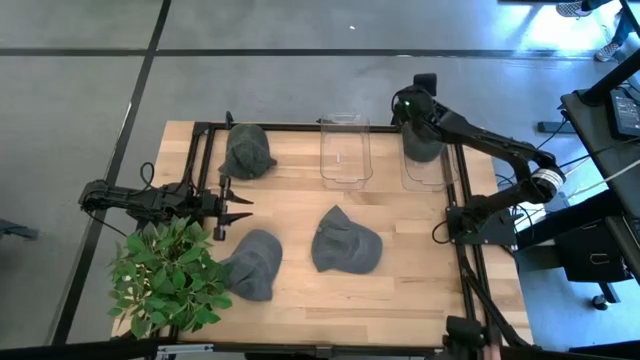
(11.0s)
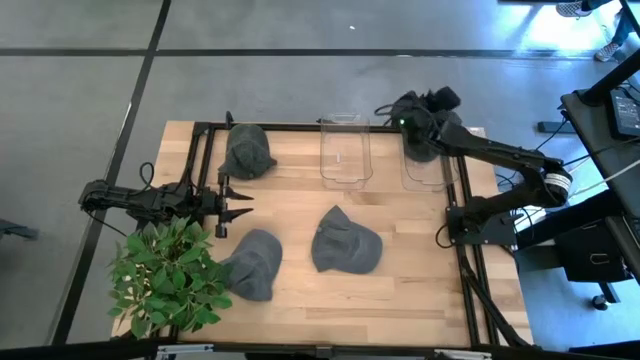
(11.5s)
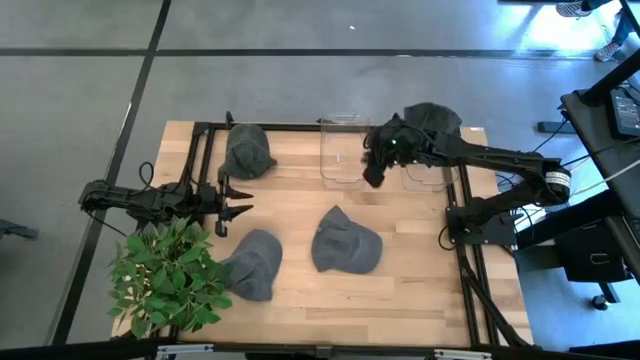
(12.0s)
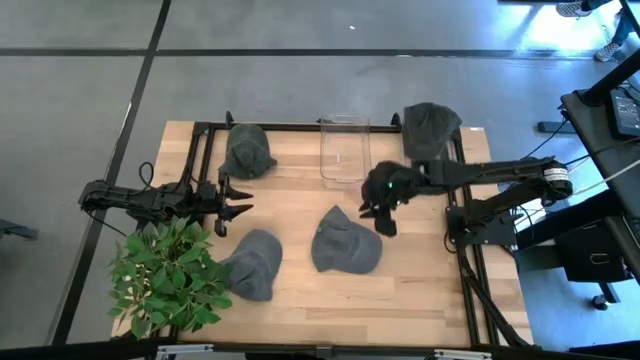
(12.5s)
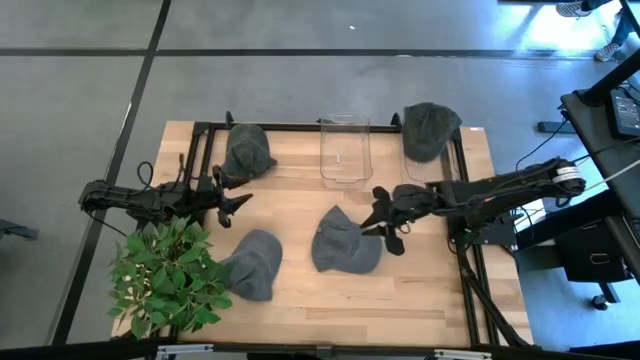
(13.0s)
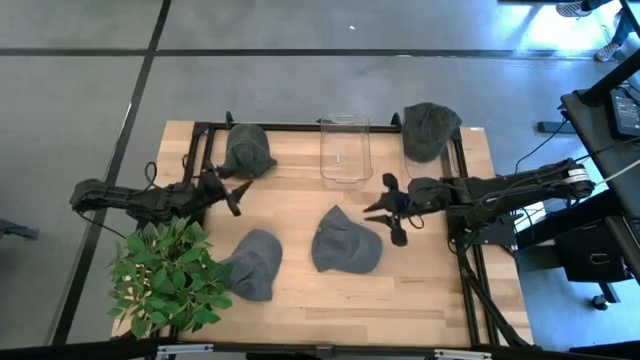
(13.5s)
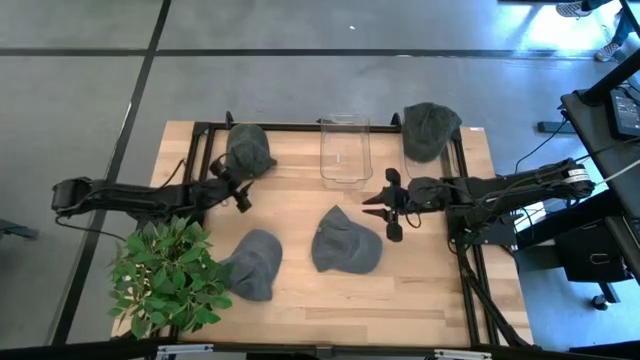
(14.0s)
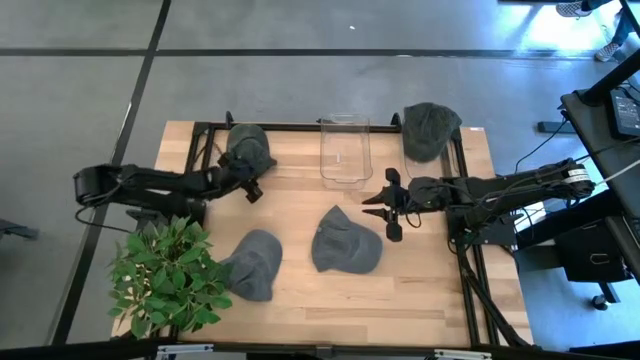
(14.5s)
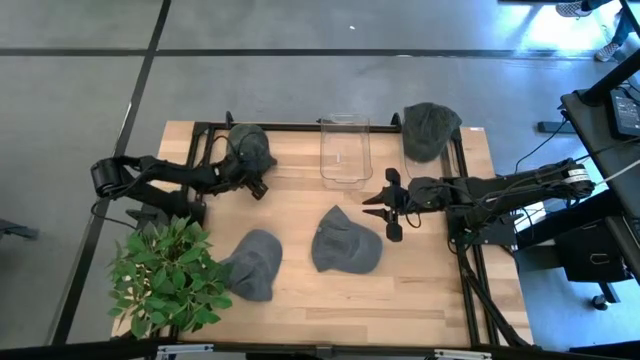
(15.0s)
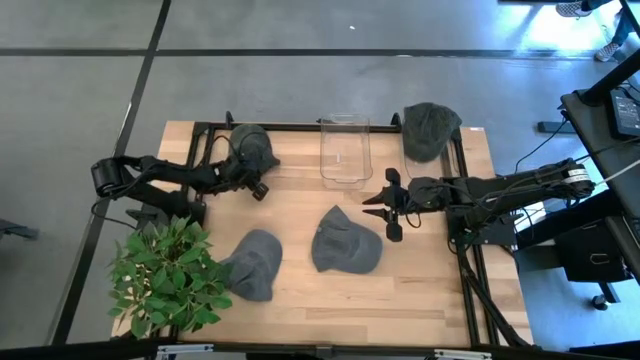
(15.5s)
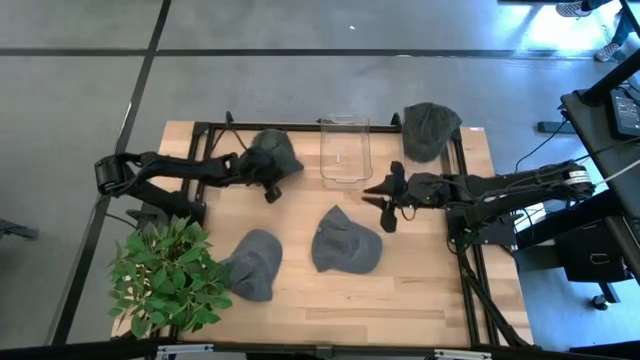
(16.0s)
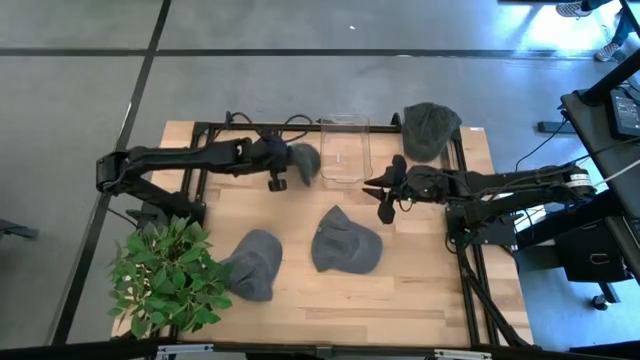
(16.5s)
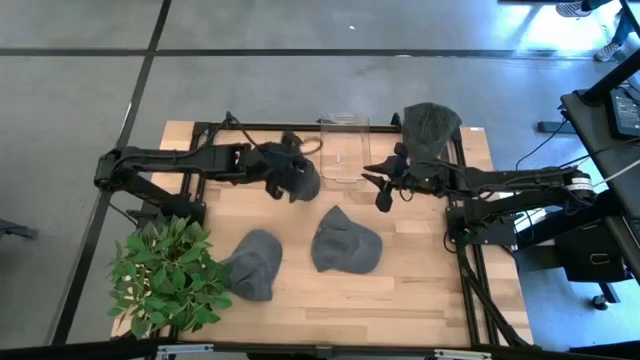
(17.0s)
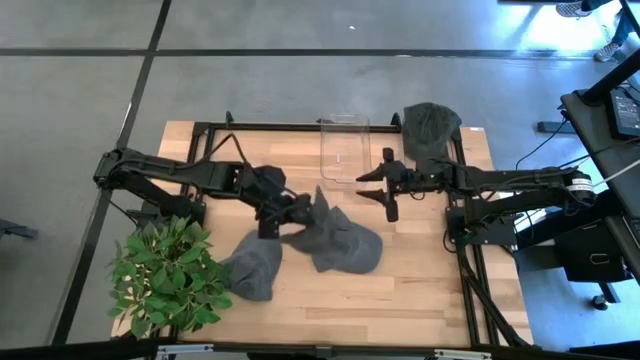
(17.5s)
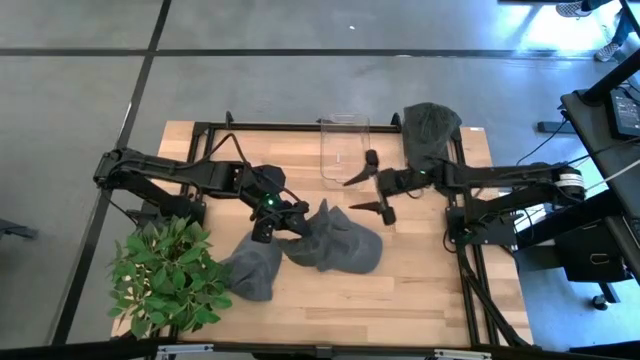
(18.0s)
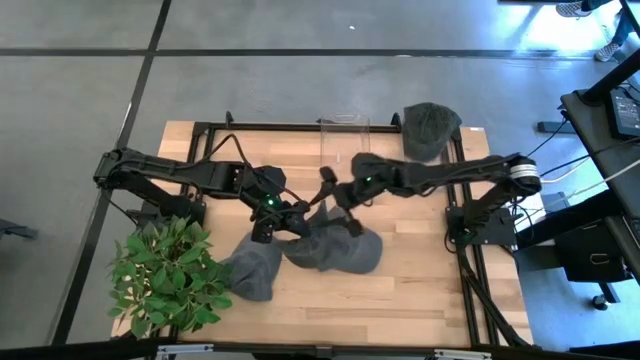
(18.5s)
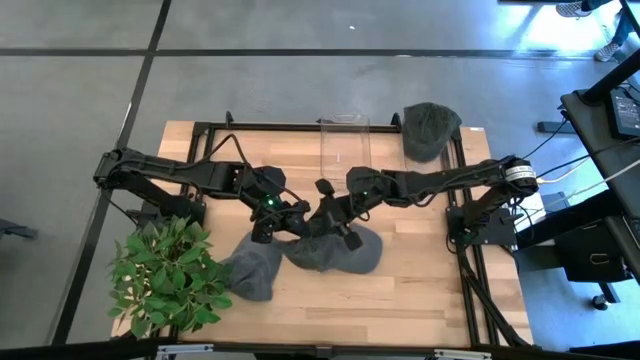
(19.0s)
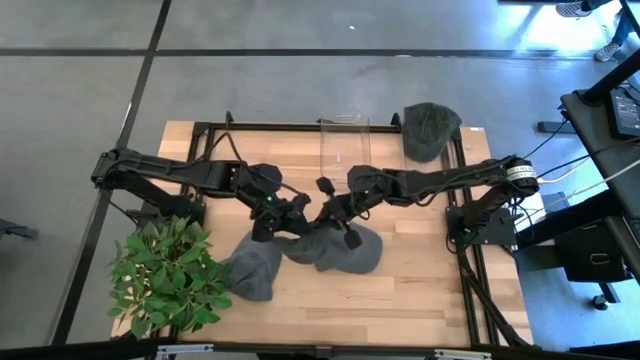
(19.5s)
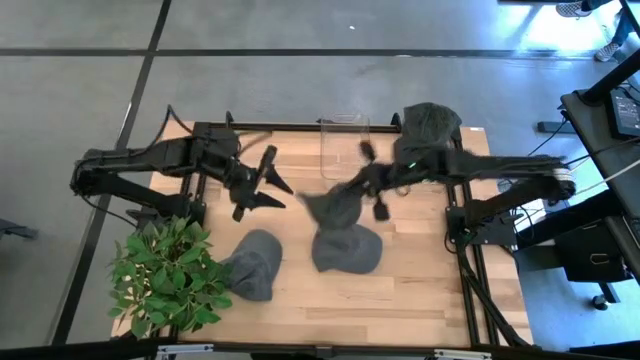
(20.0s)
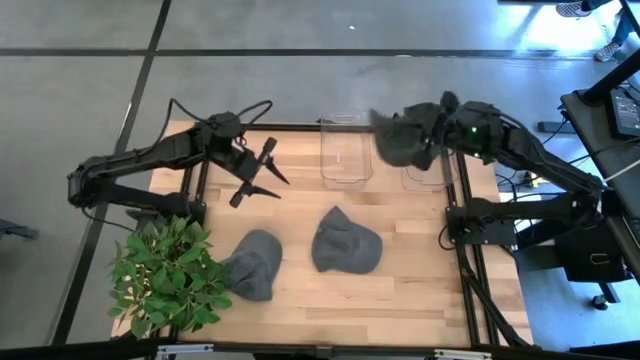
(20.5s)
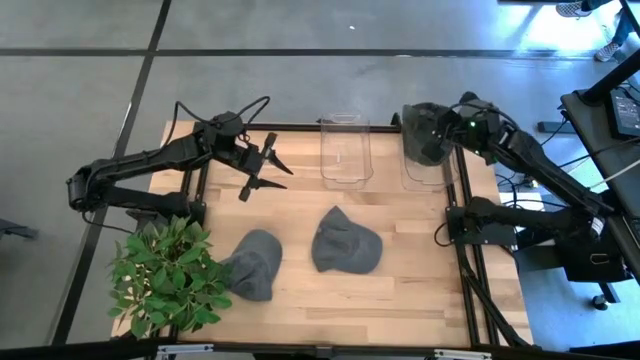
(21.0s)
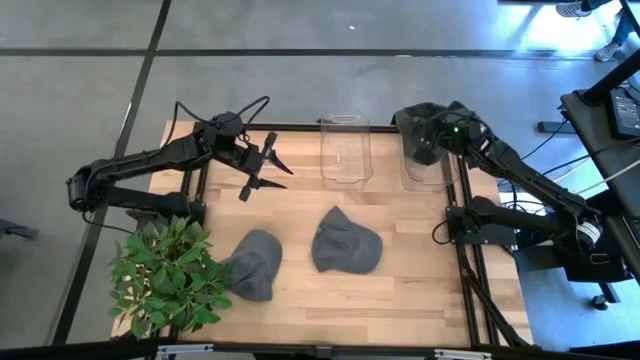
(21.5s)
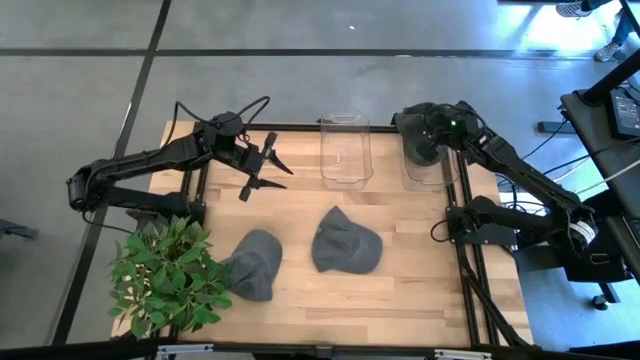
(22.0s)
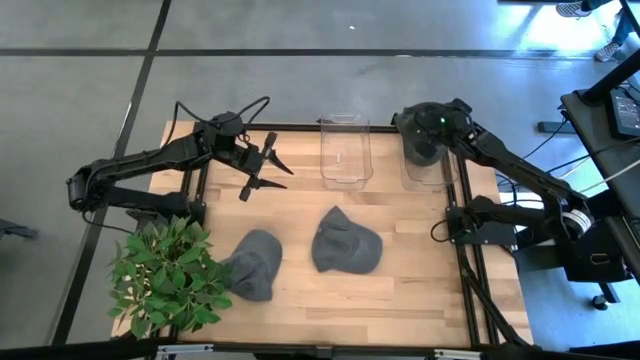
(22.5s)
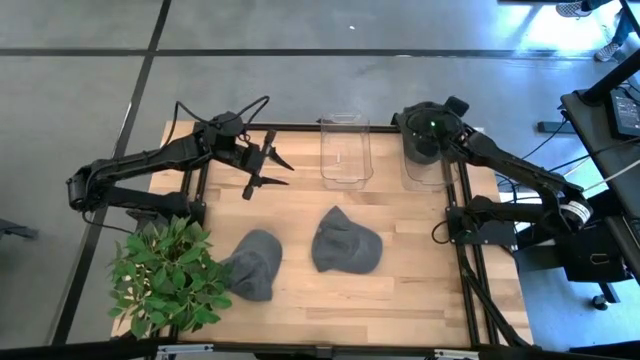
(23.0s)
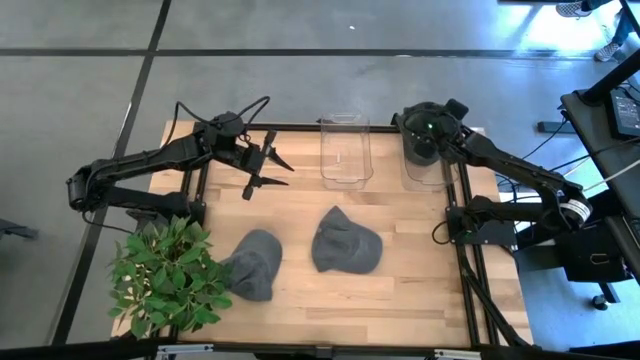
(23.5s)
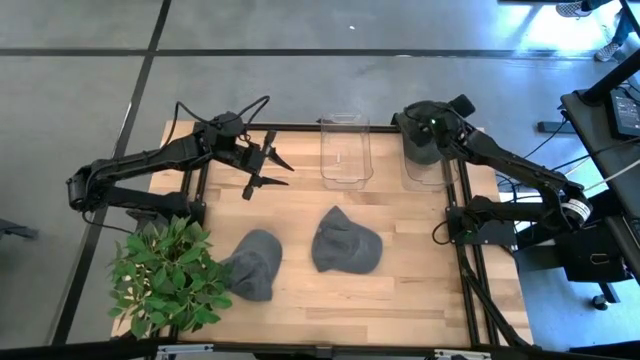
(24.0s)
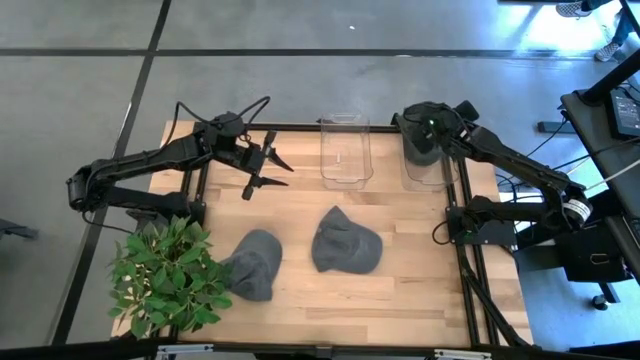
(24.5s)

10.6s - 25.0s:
Task: Pick & Place hat
Put the black cap into the right transparent bin

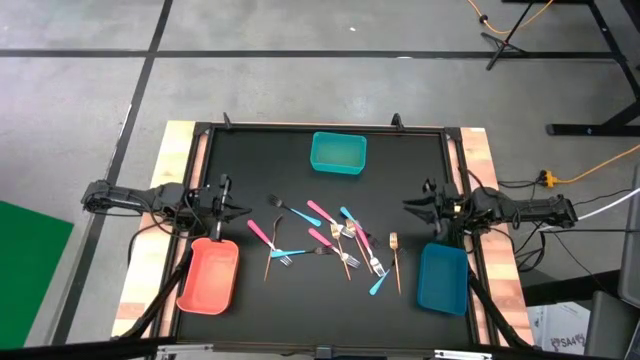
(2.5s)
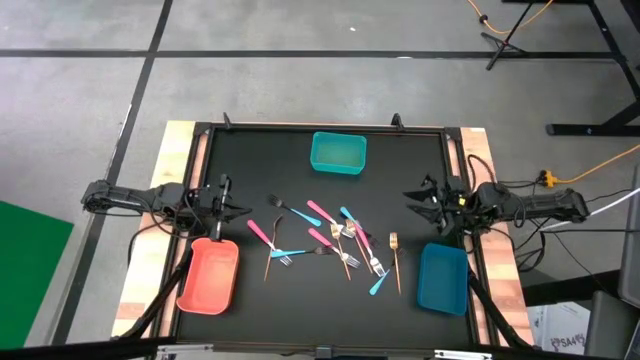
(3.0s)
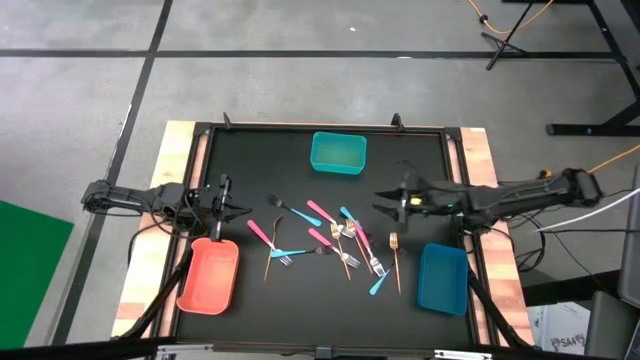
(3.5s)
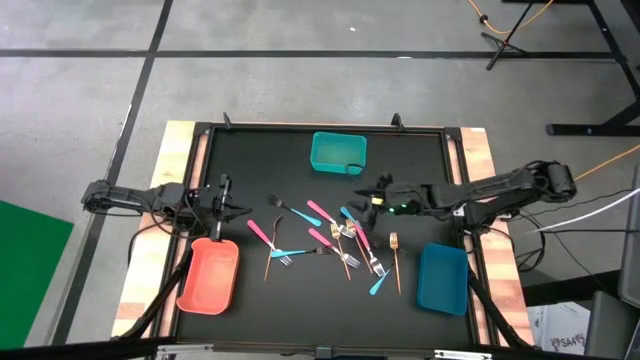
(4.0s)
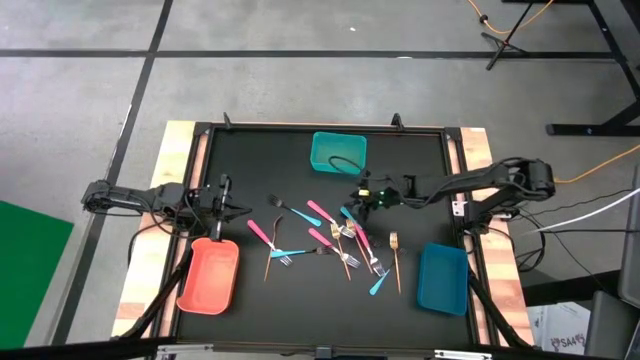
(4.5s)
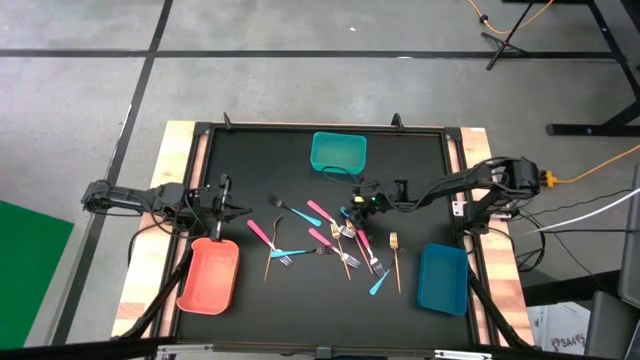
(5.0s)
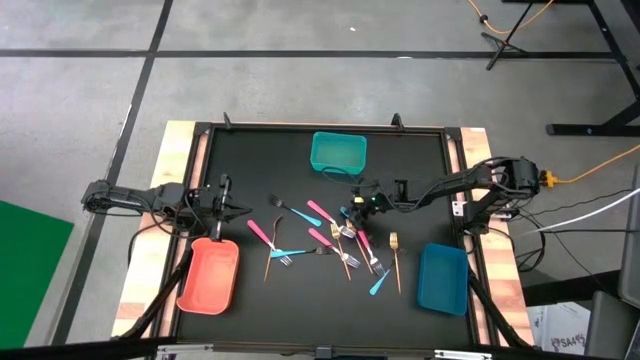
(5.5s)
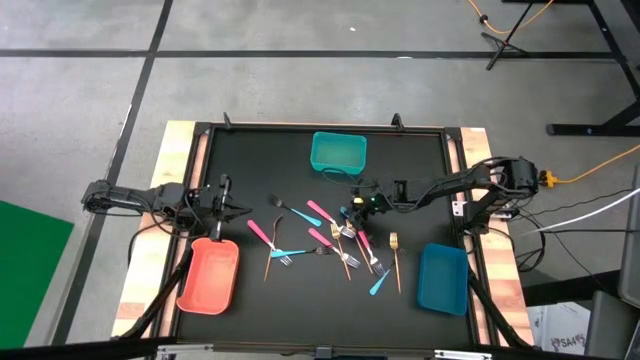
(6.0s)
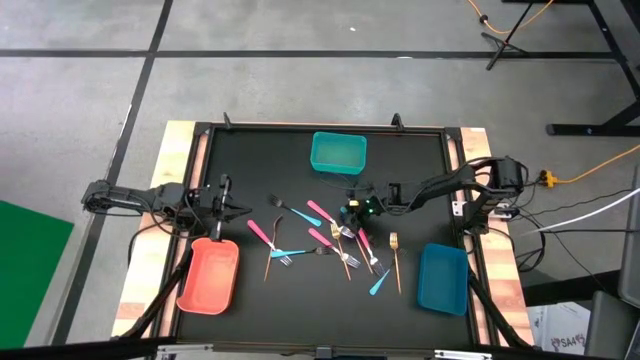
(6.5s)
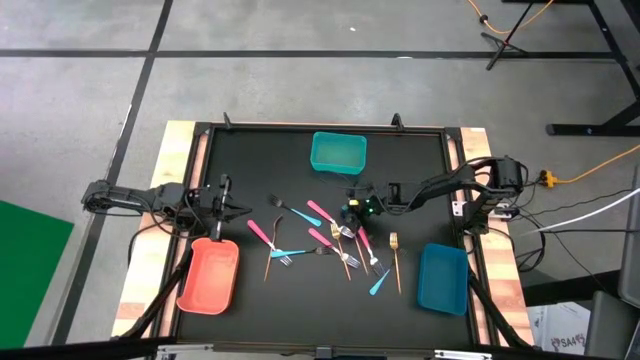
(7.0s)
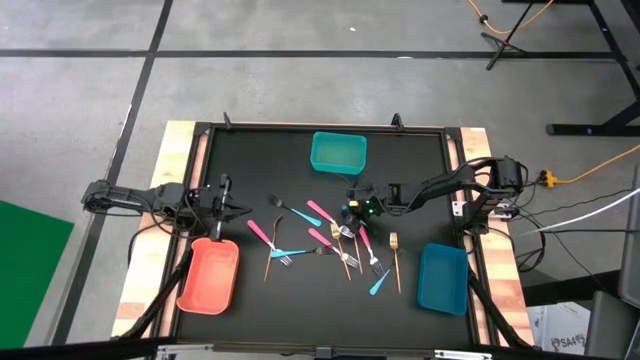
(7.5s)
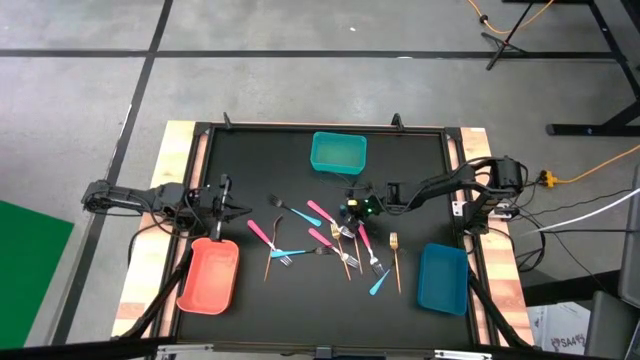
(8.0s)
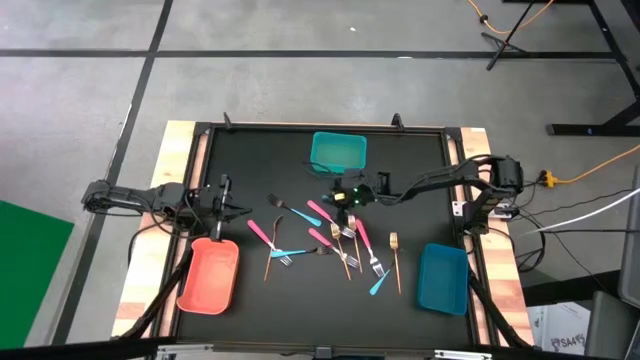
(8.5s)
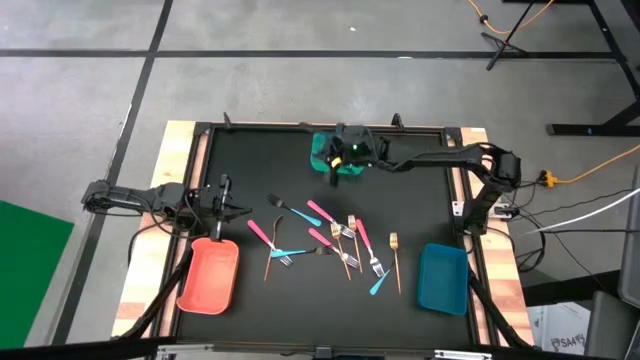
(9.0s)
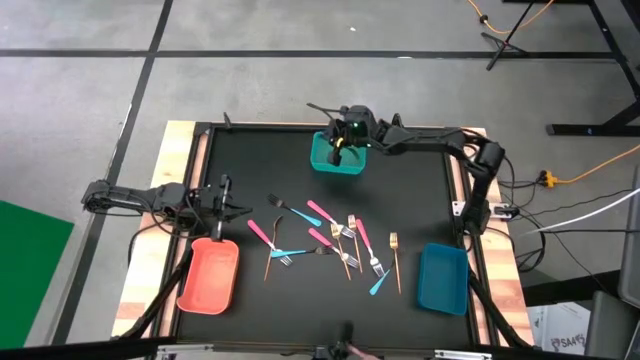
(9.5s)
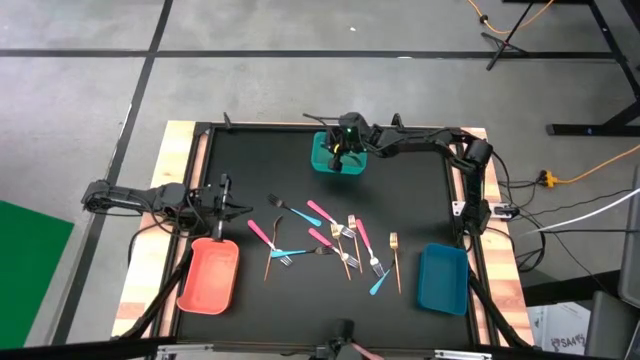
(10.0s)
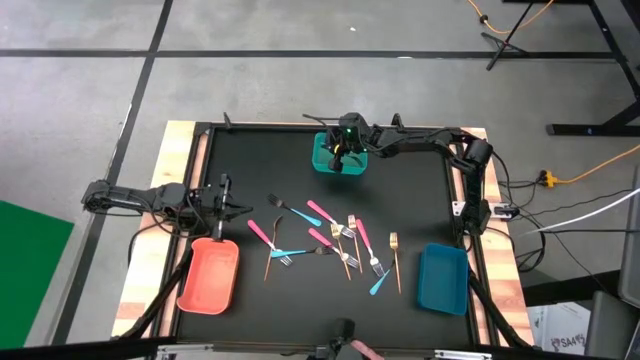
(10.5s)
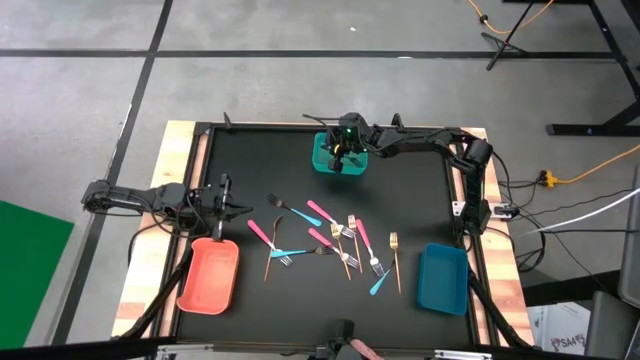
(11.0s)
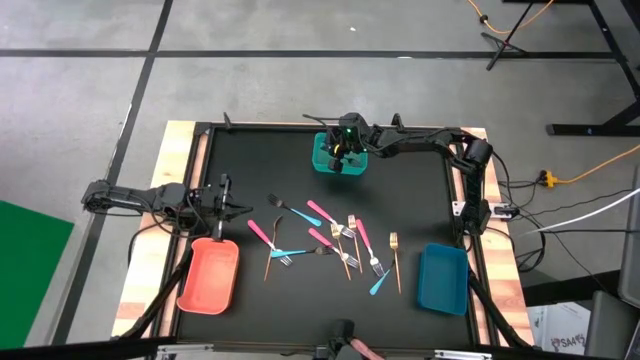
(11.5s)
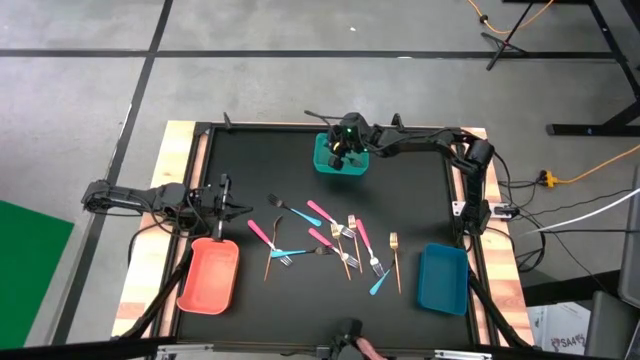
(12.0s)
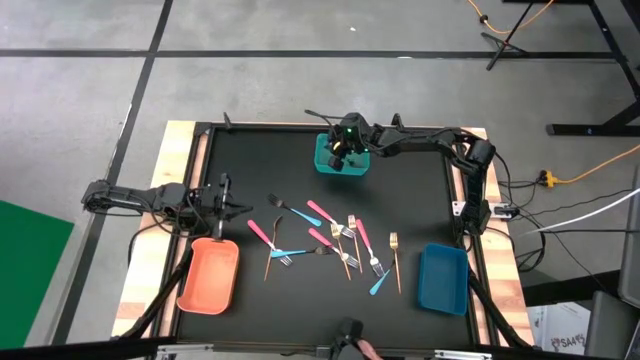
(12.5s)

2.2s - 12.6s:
Task: Sort silverware by color (type)
Put the blue fork into the green bin
